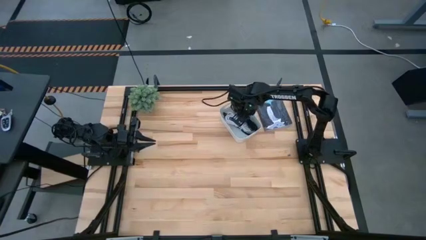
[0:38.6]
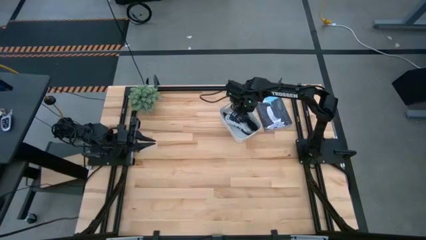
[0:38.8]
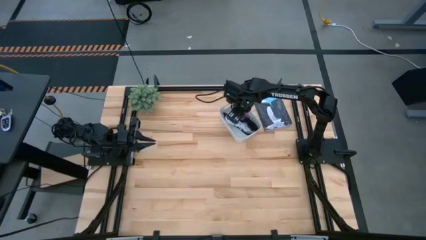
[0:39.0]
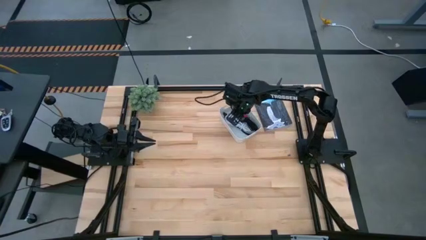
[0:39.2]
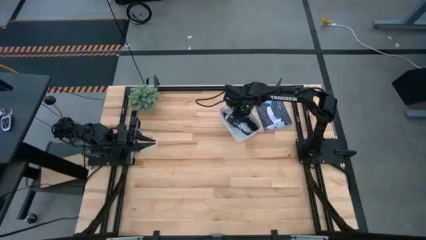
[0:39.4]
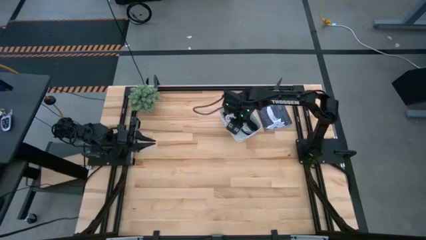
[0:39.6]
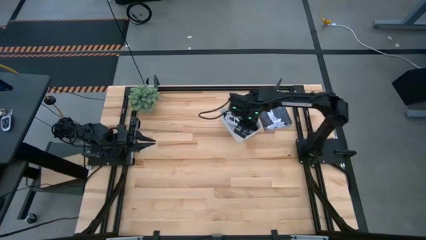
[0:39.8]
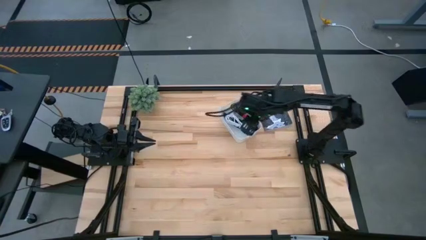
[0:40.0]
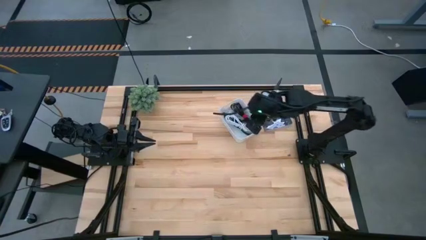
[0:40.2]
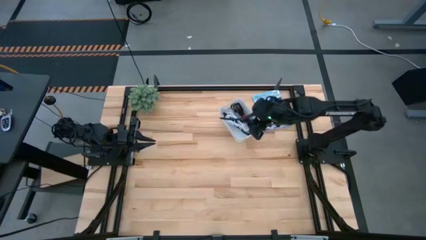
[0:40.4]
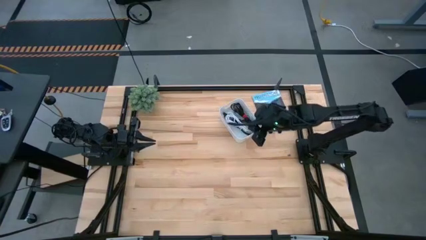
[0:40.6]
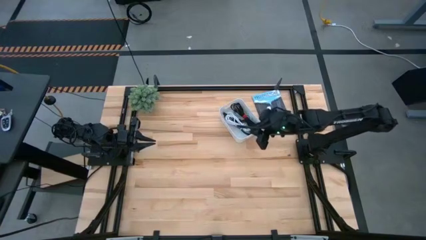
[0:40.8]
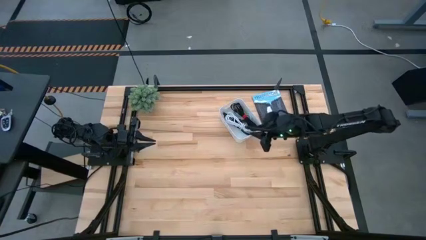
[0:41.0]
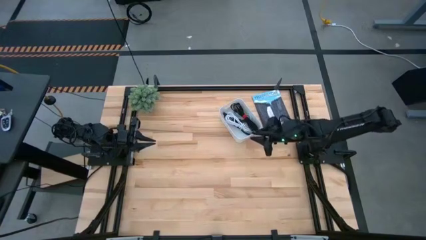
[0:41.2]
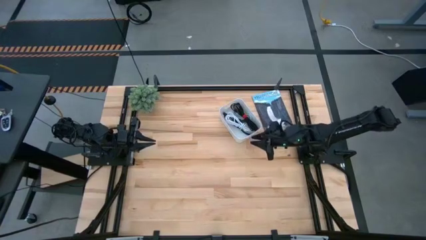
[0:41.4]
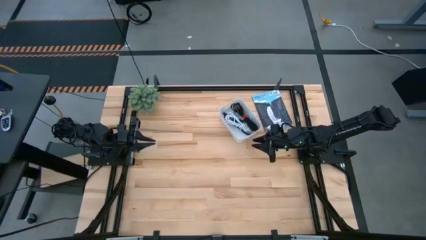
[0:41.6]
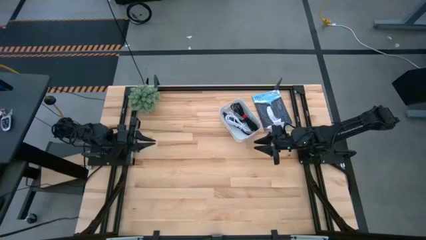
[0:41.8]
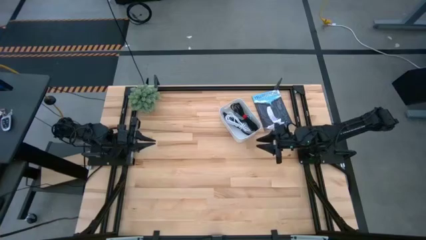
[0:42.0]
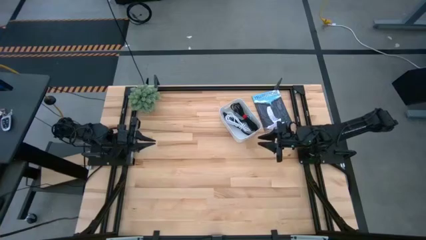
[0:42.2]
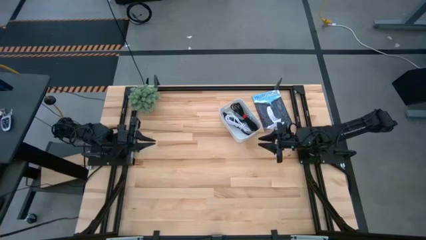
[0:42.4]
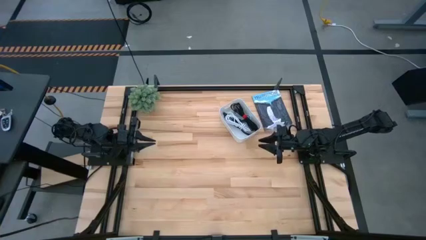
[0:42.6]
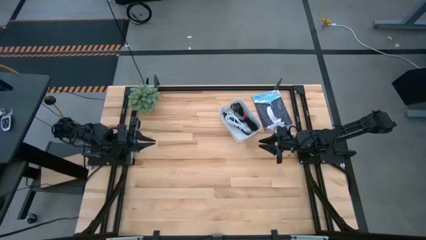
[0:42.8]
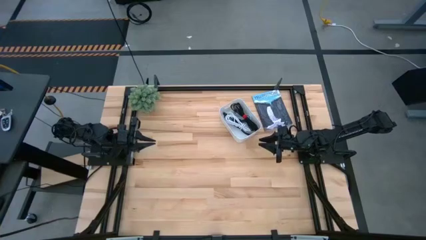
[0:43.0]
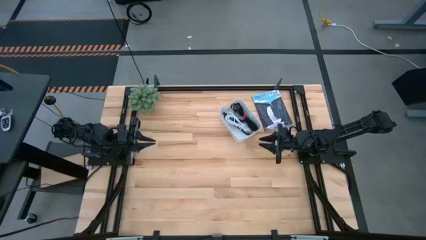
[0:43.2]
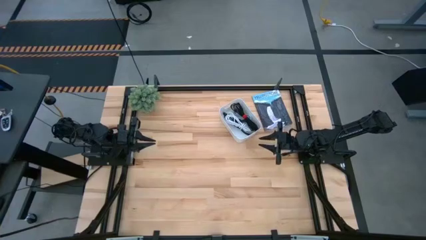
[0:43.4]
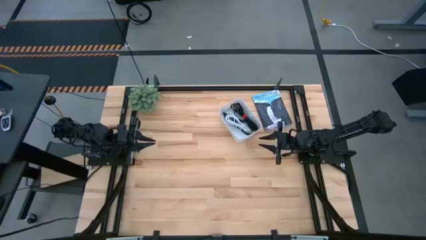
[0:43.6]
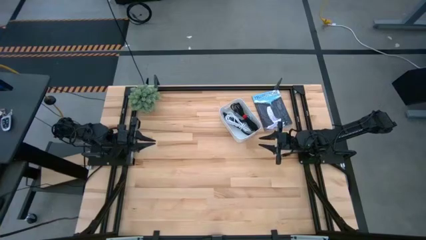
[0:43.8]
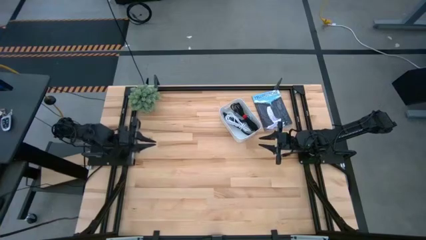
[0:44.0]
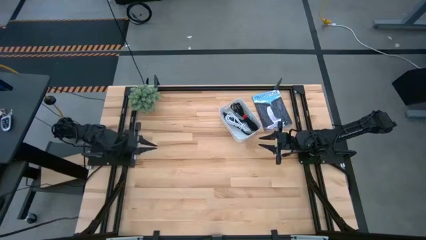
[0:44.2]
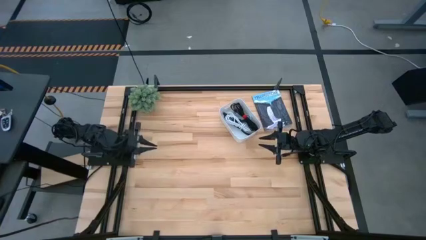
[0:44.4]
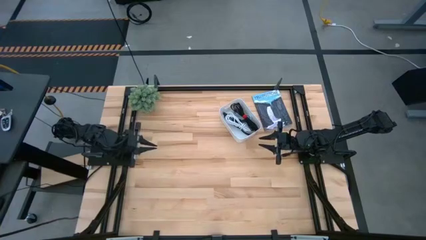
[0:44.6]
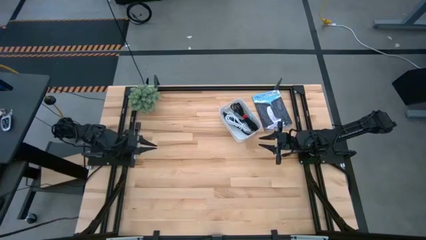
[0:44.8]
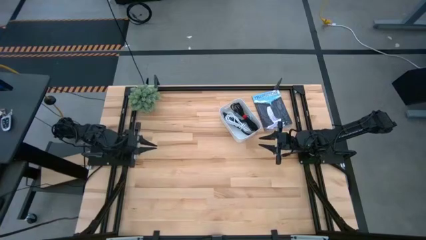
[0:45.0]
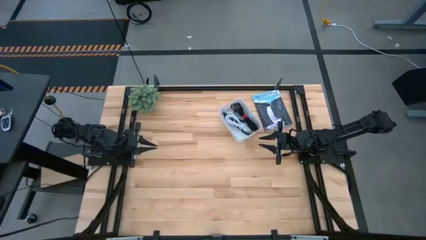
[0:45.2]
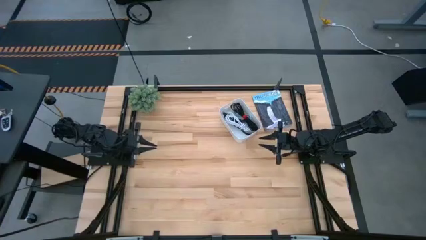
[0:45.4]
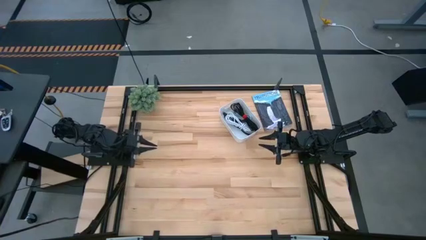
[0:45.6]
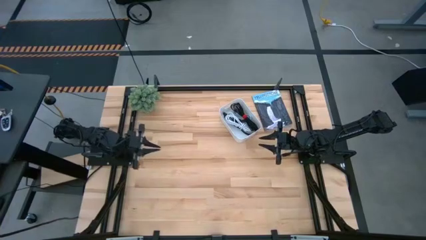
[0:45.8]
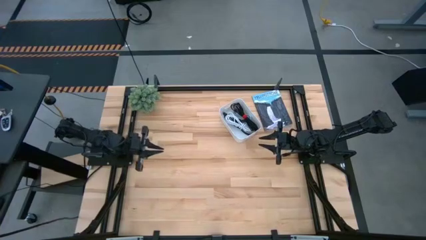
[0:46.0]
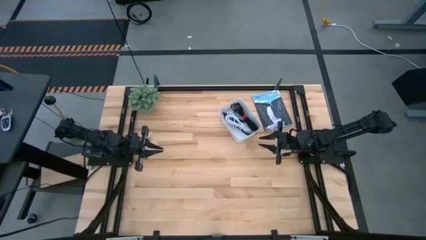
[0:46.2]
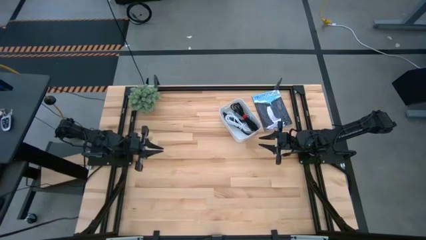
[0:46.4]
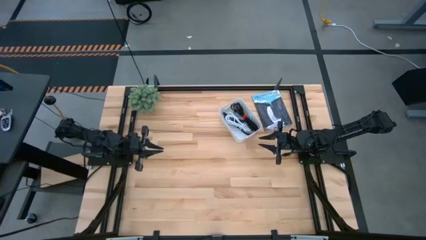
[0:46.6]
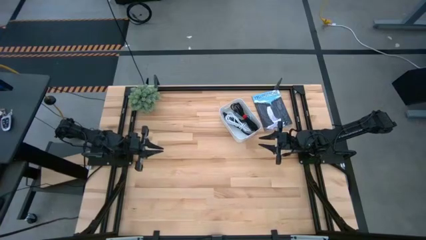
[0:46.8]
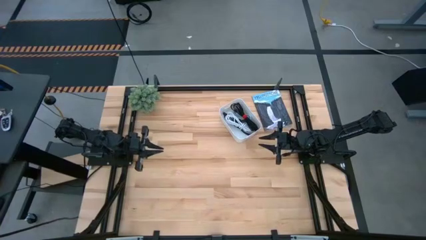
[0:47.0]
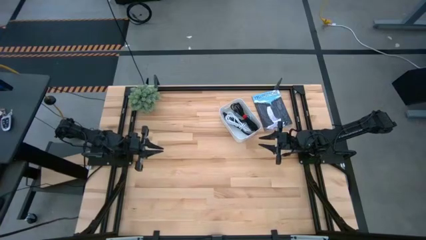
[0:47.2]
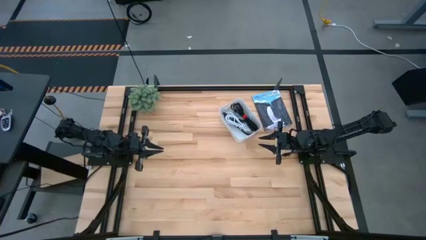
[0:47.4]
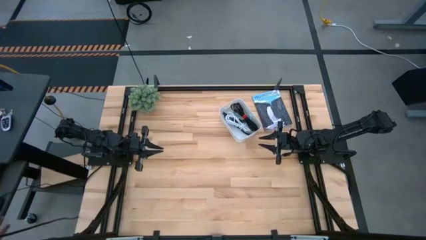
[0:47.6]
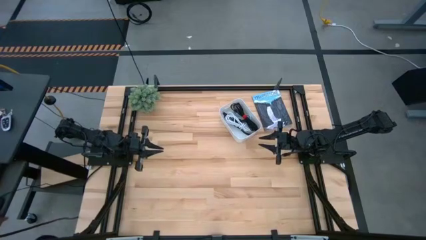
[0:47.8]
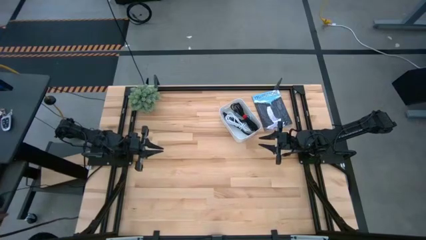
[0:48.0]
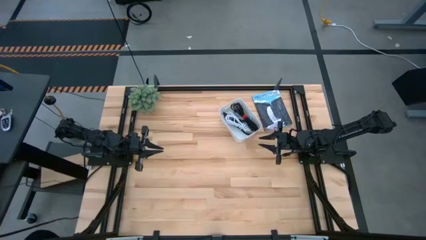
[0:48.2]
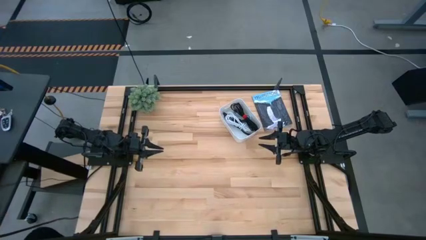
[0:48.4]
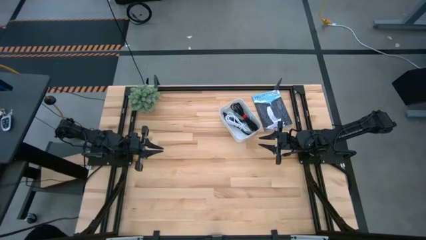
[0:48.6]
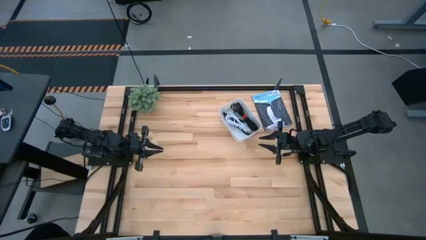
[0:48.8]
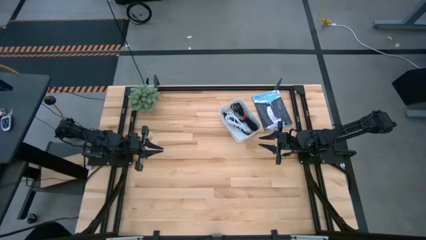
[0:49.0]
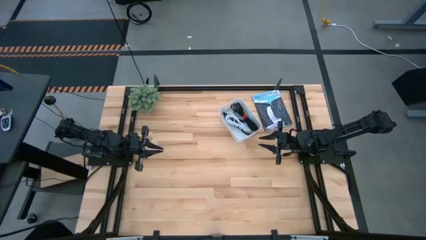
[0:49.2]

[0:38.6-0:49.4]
Task: Pick and place USB-C Cables
Return to Home Position
